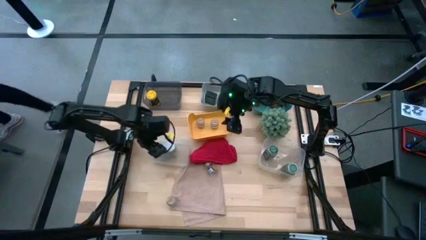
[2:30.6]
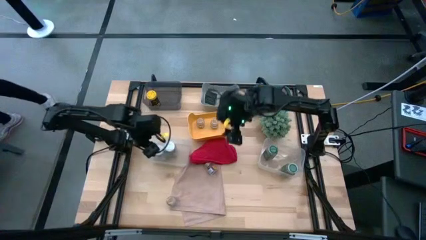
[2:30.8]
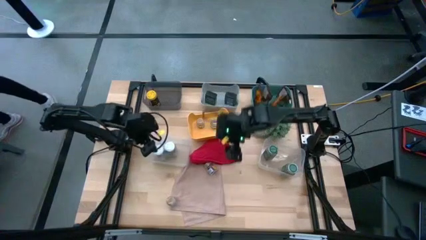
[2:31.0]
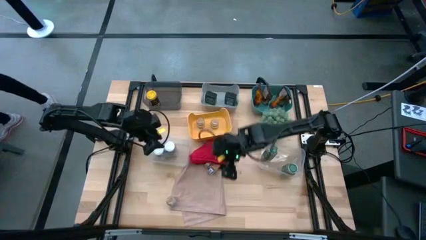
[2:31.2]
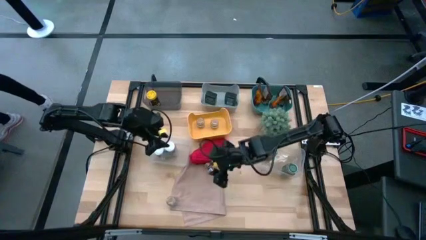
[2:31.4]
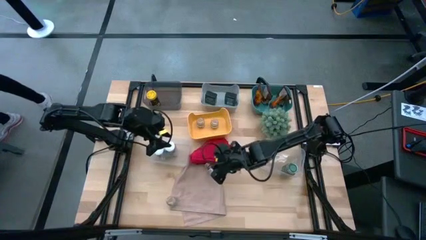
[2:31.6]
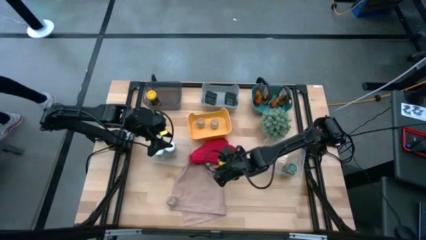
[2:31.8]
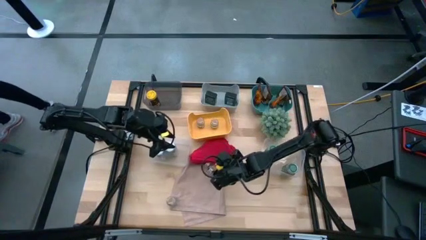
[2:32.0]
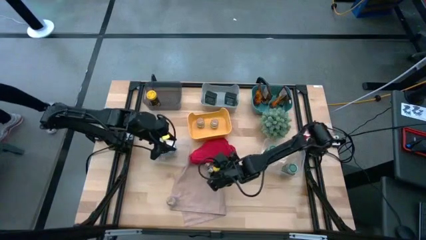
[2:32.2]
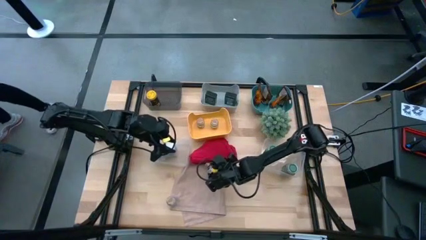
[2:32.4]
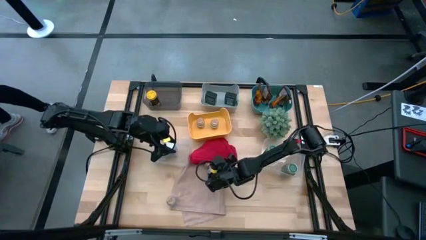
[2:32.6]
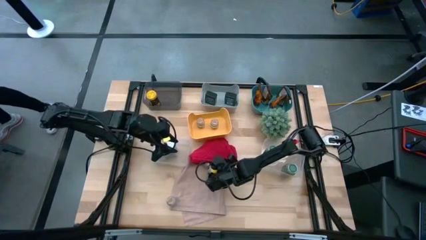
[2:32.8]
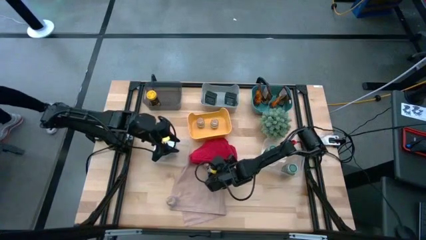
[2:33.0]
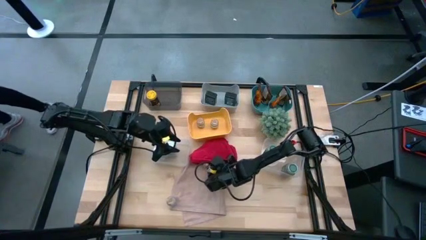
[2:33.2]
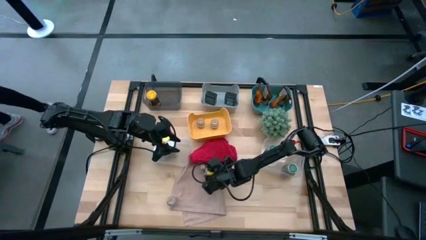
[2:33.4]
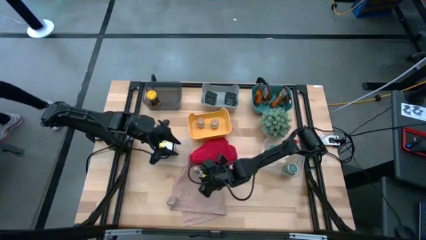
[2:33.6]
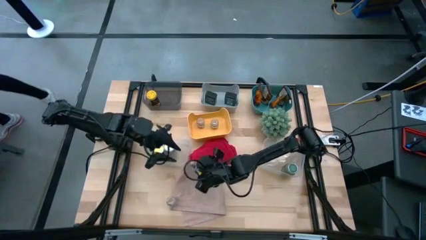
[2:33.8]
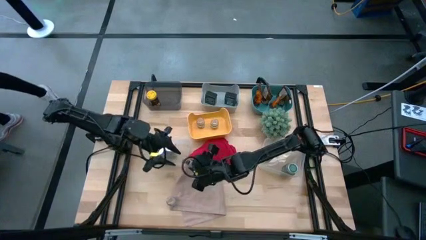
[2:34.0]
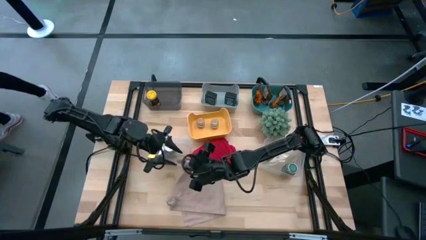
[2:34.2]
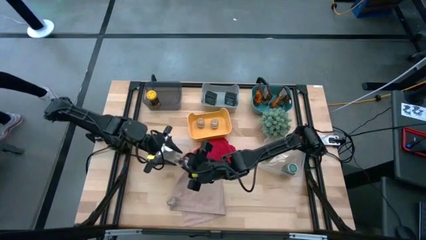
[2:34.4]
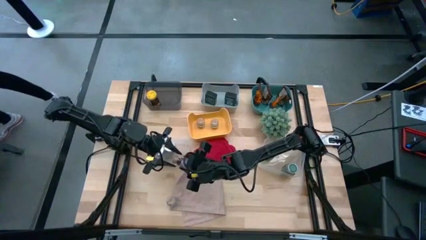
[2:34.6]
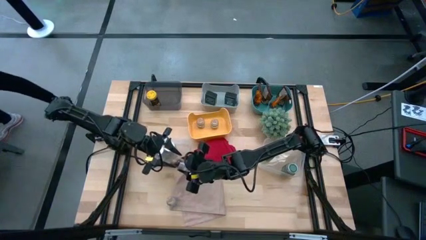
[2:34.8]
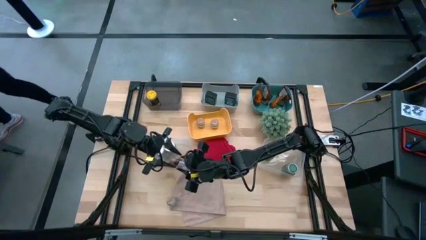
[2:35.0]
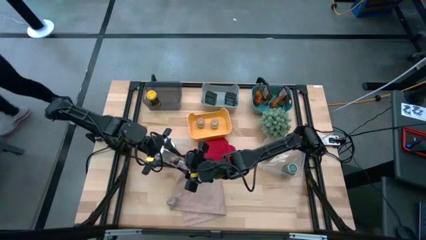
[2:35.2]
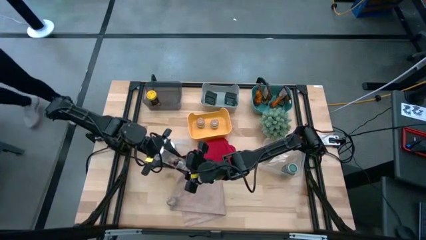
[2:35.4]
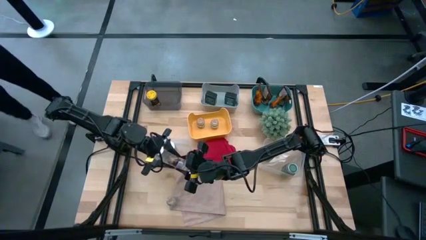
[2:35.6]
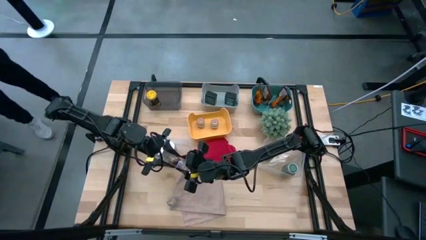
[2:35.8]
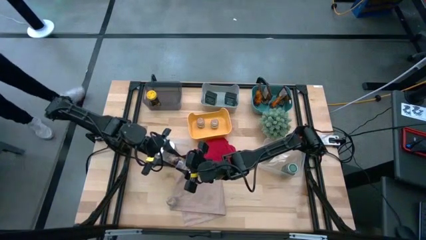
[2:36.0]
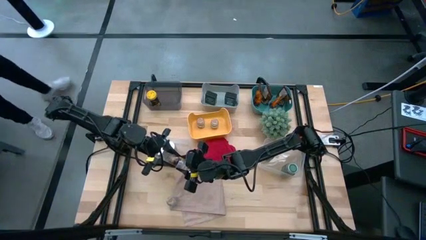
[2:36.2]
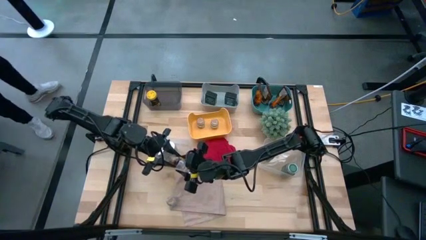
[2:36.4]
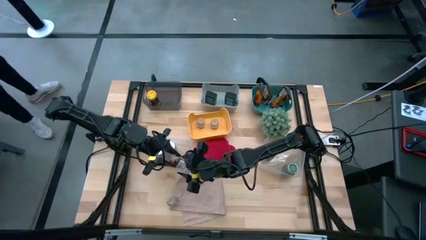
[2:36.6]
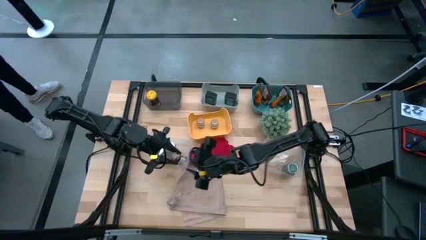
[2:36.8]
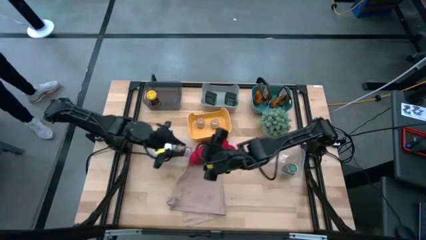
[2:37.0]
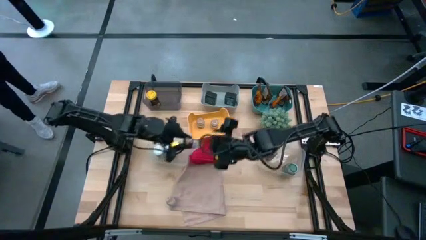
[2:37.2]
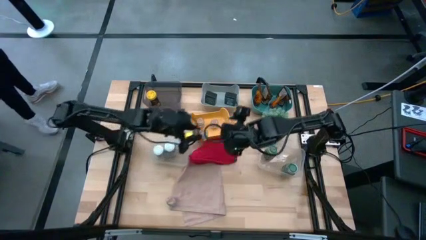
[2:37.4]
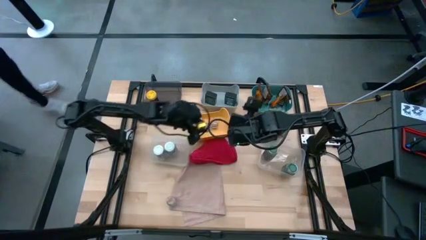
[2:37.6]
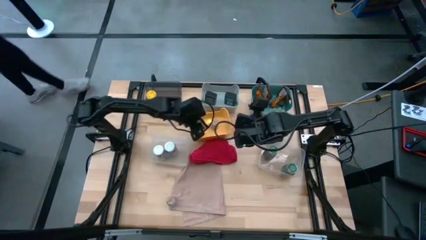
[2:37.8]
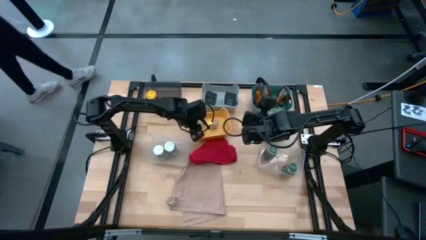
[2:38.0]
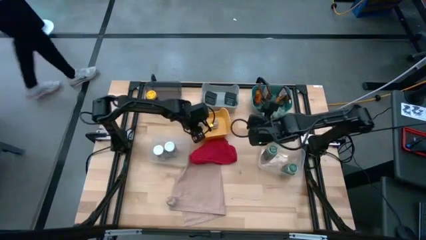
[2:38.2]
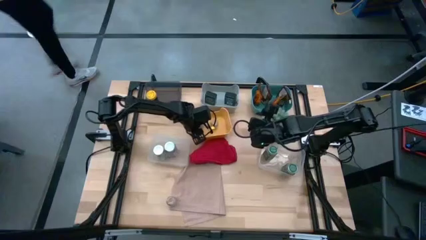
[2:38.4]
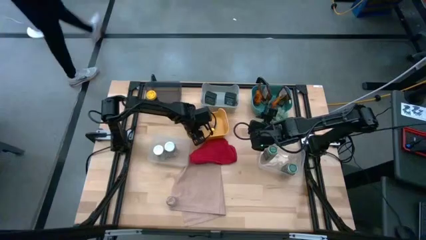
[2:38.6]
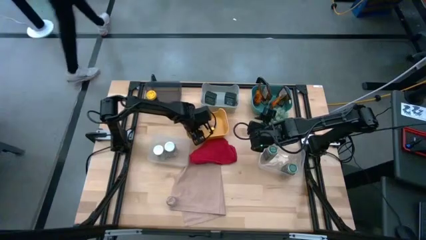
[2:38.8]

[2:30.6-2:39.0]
Task: Sort spices by type
Put the brown seasoning bottle into the yellow bin

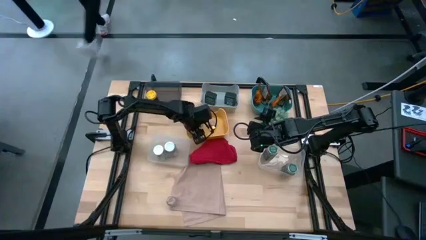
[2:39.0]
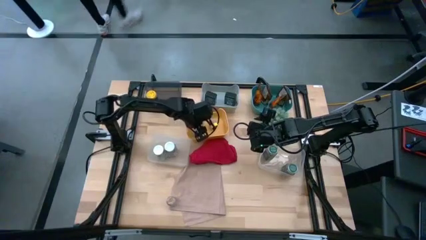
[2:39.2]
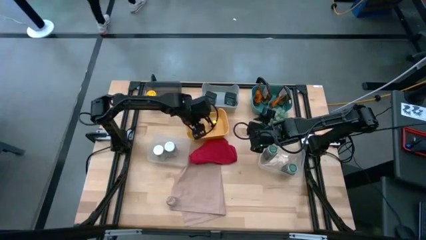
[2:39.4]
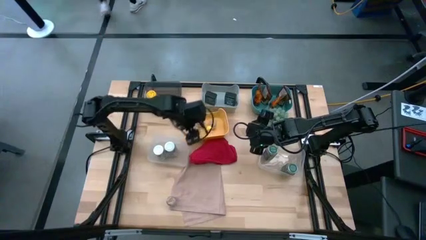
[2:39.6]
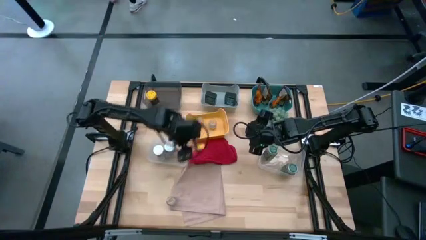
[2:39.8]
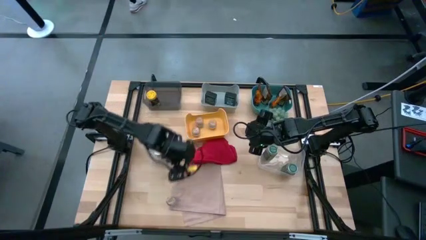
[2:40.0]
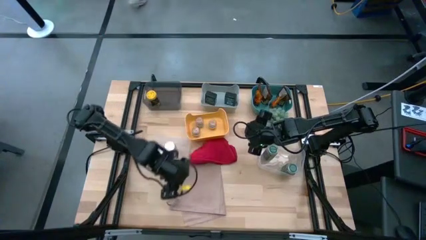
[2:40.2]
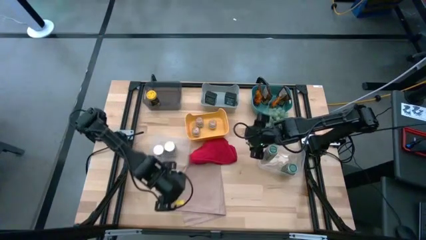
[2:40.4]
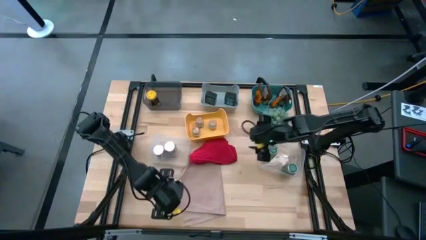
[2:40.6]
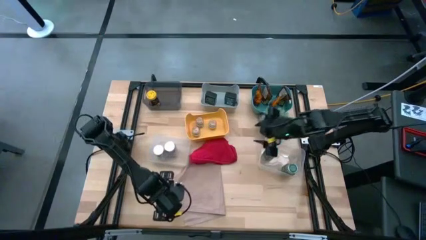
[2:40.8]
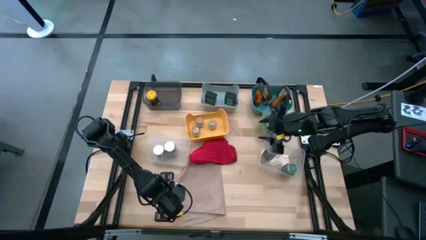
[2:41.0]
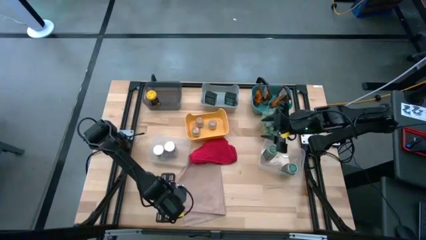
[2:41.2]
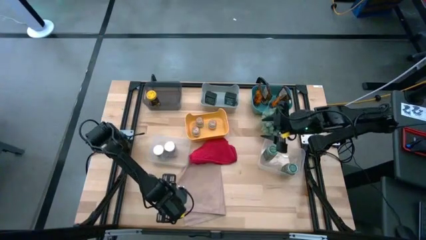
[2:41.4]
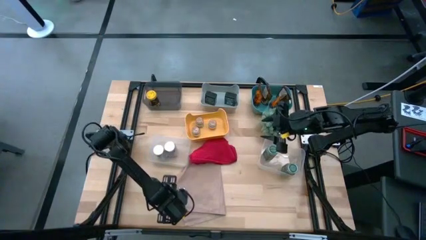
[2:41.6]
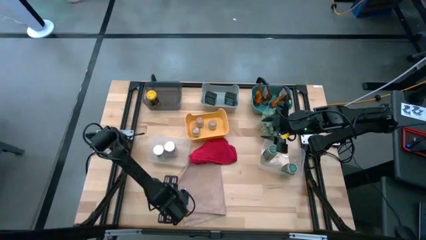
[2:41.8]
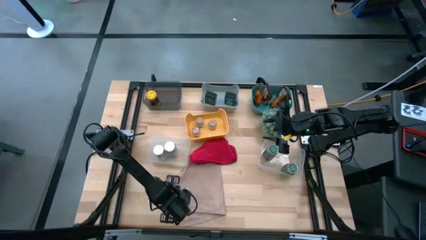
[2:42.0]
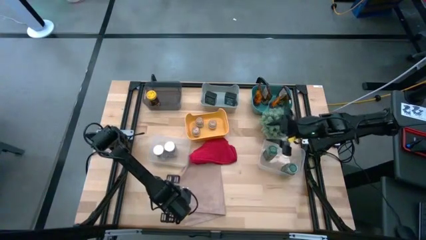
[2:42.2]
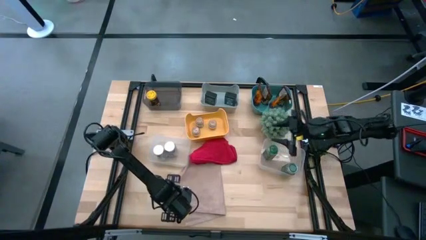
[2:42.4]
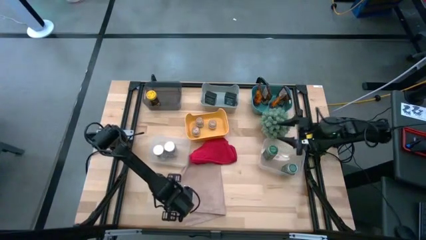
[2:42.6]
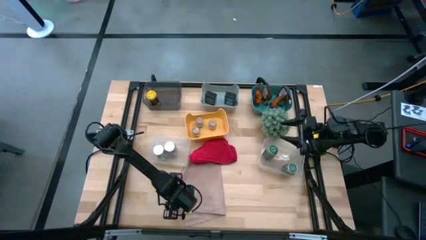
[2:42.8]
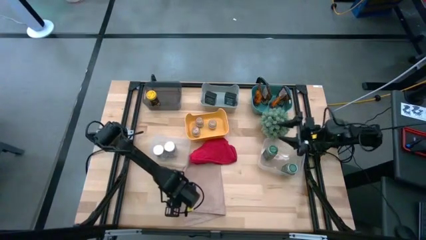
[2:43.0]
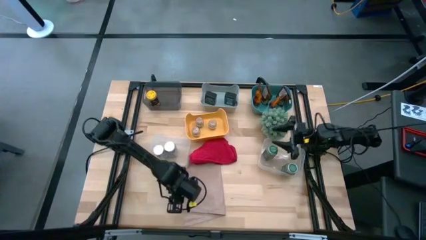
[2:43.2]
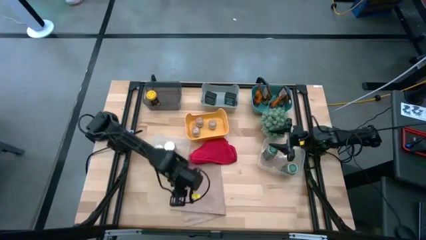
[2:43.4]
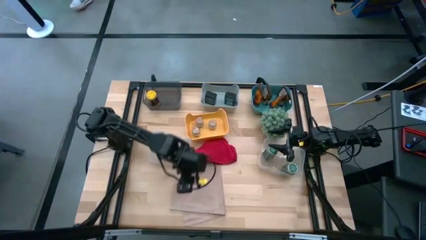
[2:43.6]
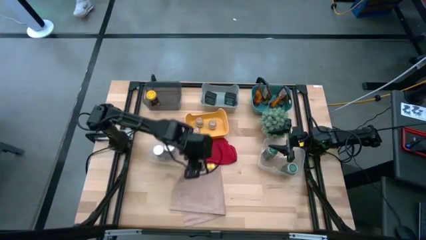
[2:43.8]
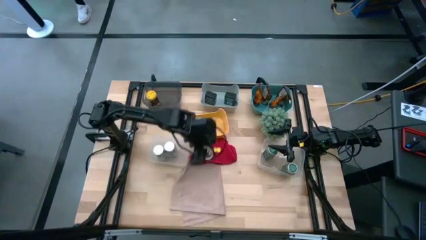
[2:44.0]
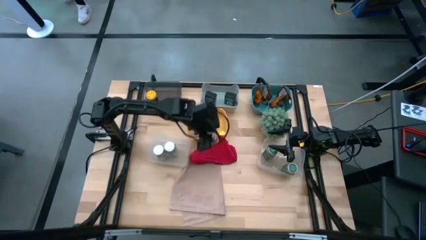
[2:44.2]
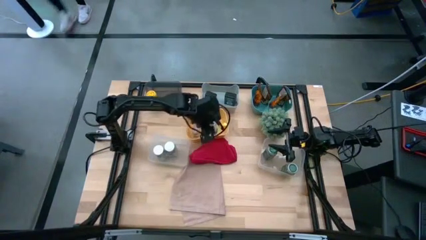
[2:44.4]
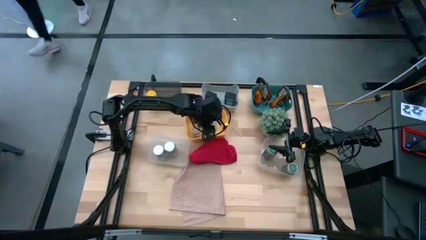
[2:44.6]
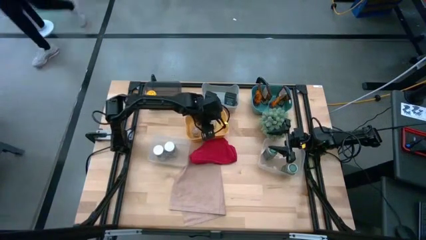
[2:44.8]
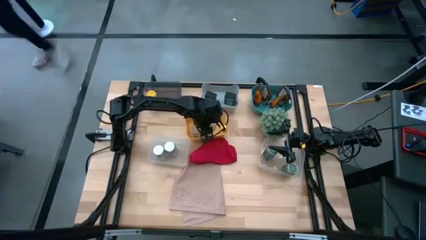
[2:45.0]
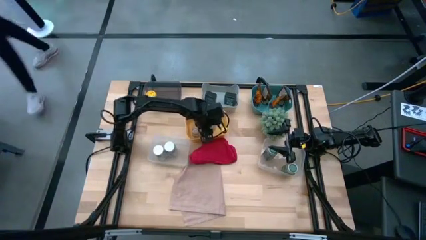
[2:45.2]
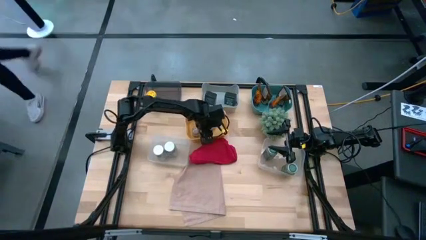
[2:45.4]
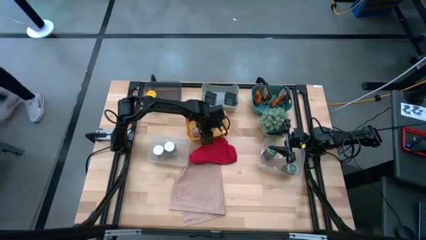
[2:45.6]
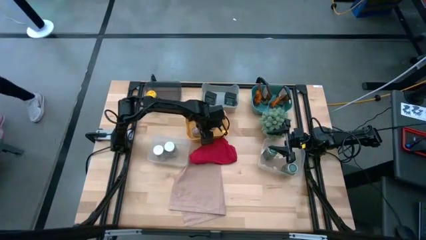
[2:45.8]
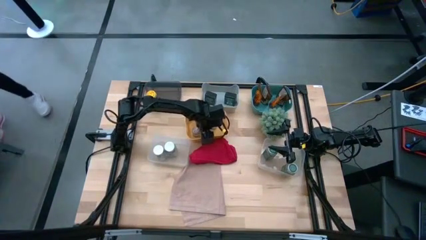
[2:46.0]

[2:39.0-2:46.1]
Put the brown seasoning bottle into the yellow bin
